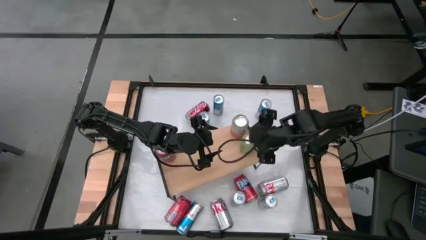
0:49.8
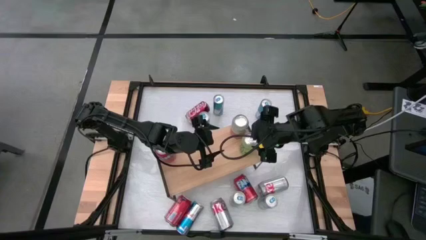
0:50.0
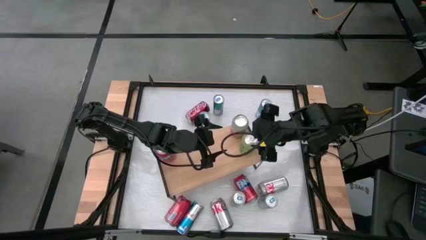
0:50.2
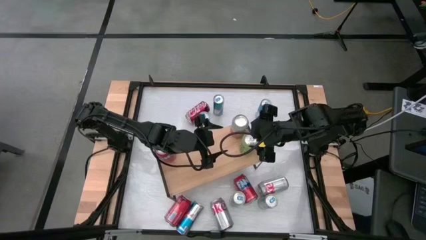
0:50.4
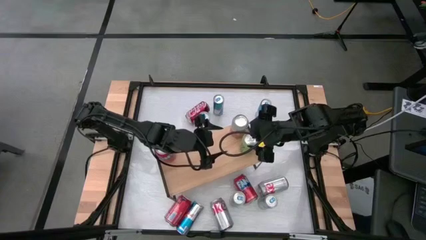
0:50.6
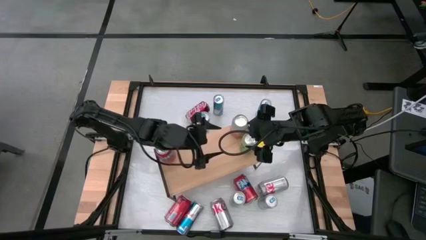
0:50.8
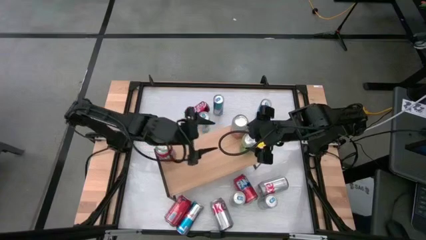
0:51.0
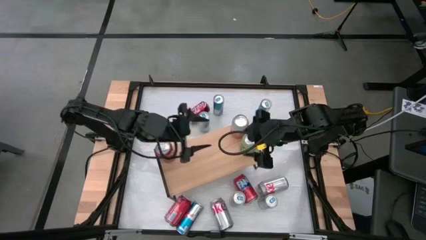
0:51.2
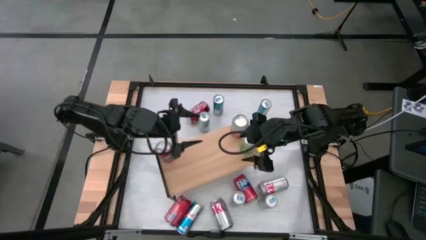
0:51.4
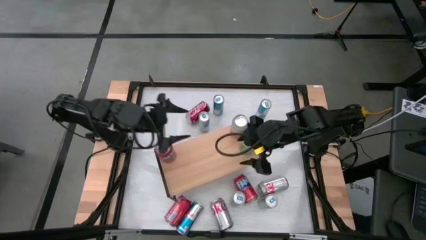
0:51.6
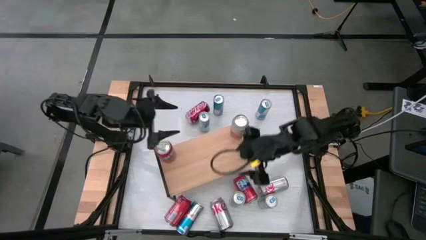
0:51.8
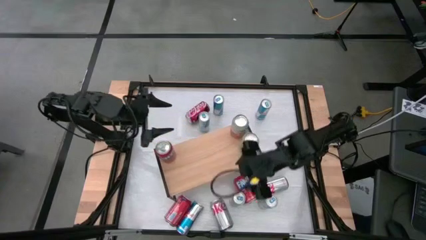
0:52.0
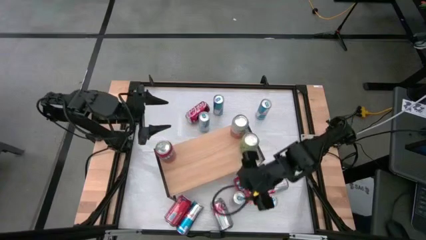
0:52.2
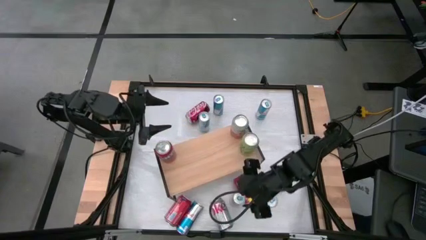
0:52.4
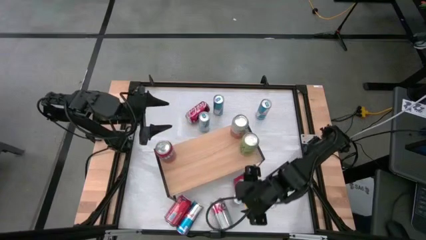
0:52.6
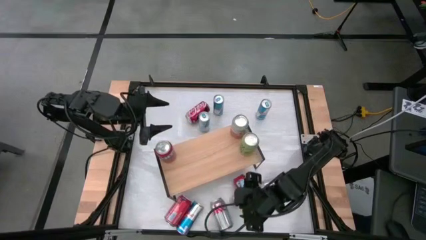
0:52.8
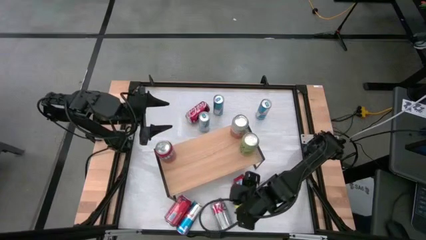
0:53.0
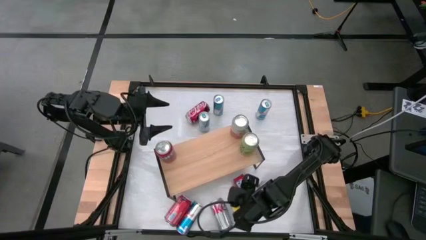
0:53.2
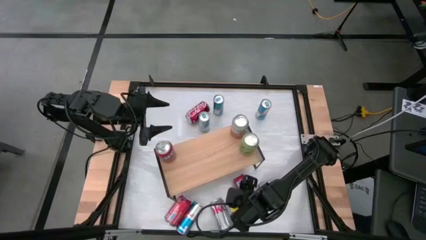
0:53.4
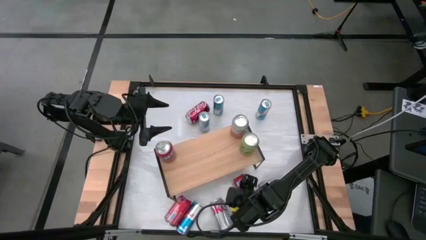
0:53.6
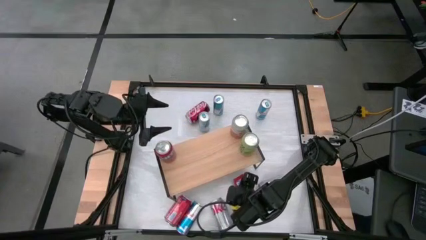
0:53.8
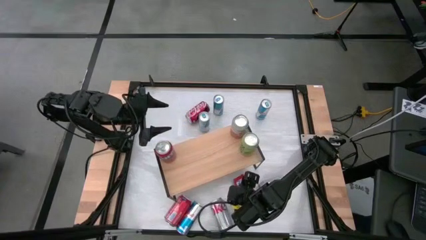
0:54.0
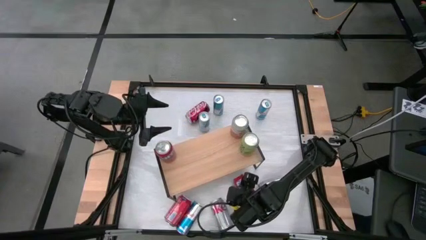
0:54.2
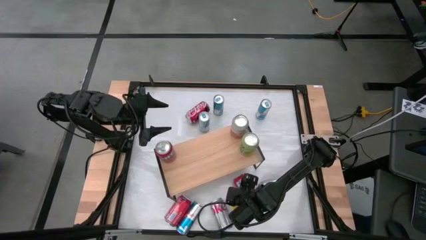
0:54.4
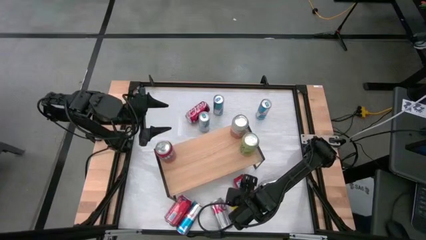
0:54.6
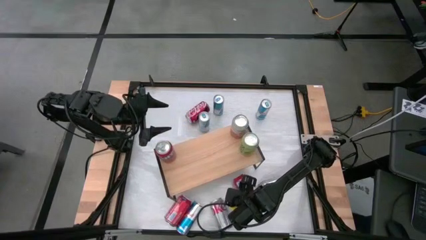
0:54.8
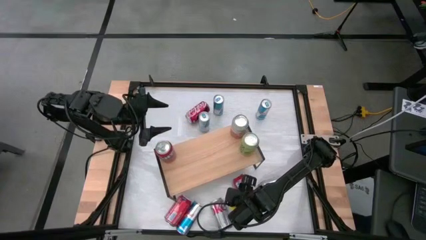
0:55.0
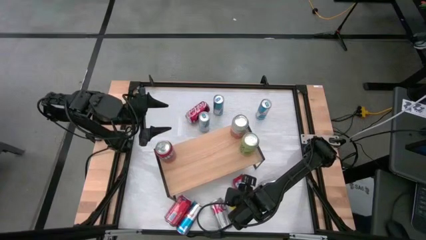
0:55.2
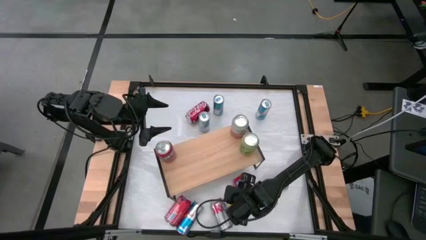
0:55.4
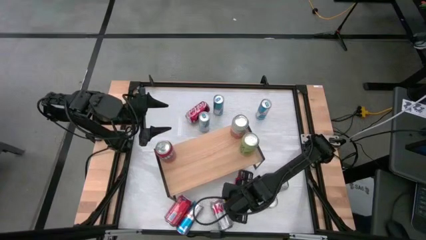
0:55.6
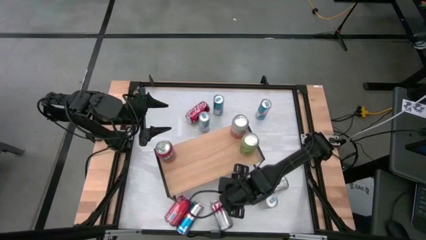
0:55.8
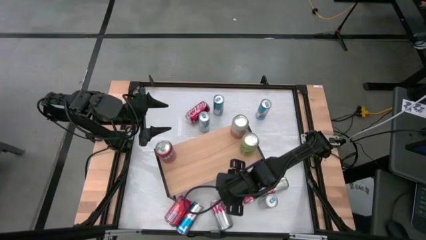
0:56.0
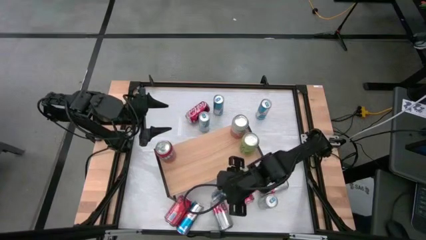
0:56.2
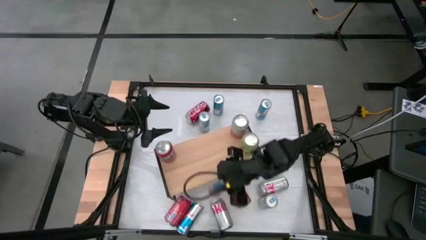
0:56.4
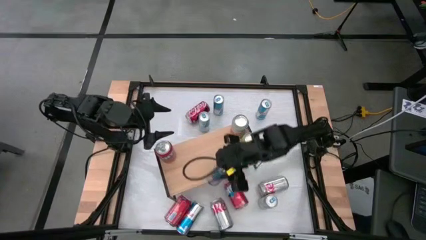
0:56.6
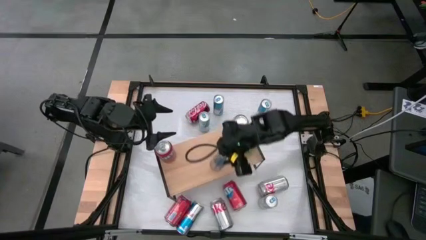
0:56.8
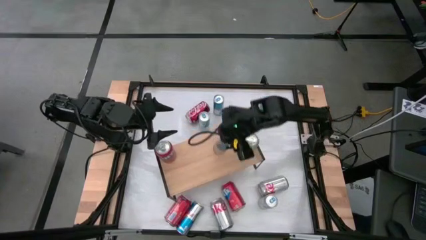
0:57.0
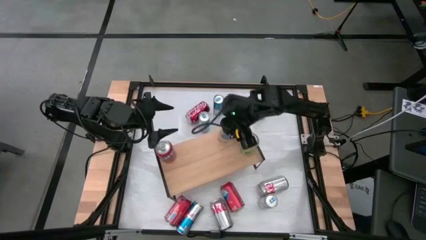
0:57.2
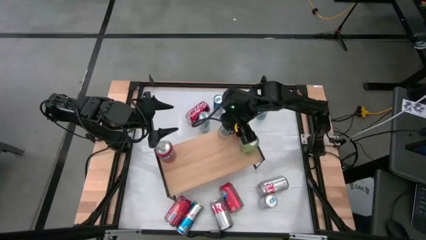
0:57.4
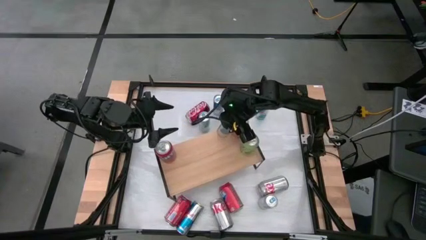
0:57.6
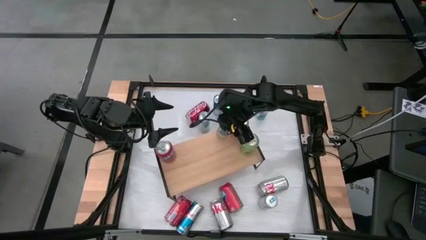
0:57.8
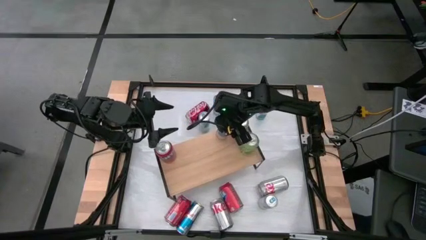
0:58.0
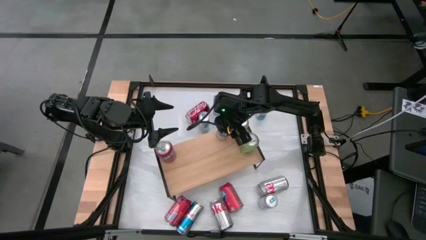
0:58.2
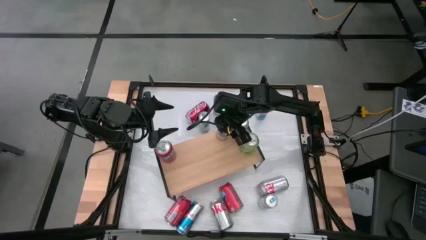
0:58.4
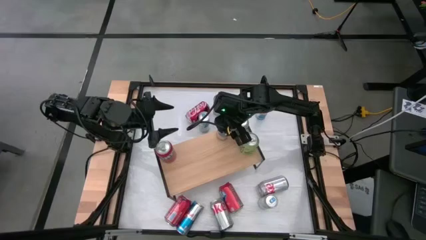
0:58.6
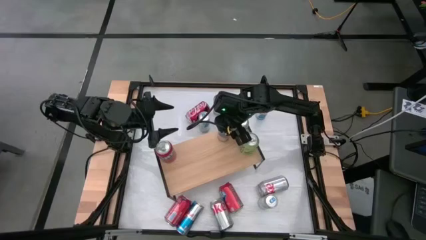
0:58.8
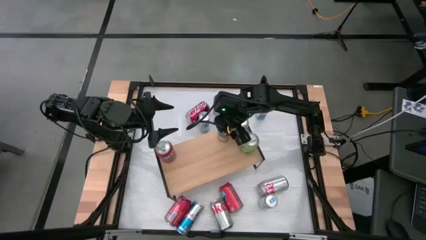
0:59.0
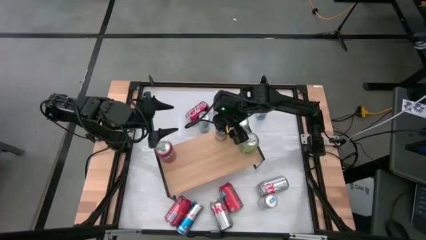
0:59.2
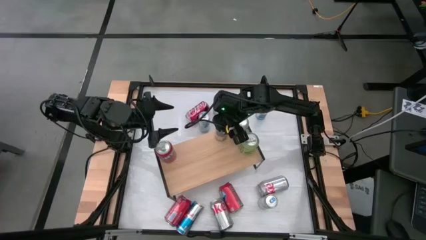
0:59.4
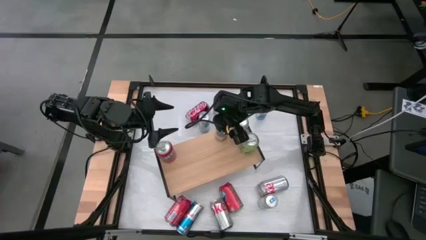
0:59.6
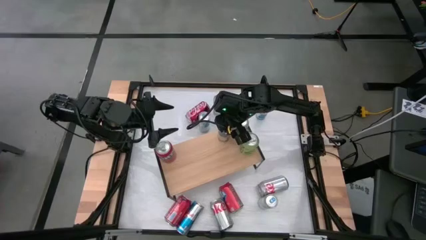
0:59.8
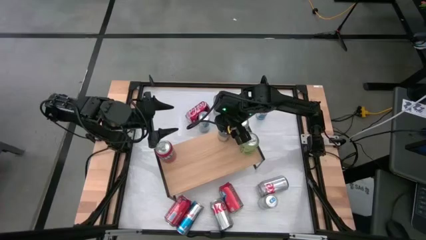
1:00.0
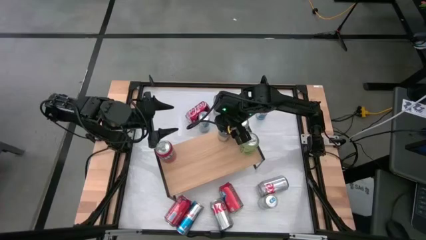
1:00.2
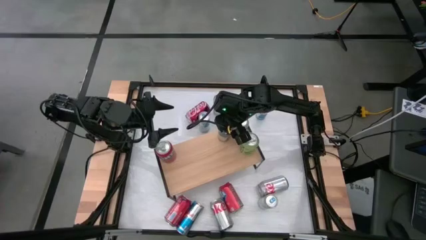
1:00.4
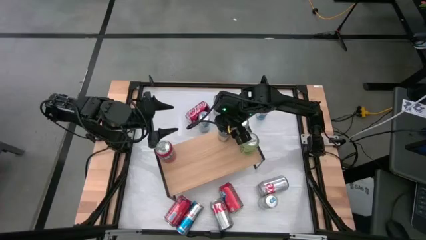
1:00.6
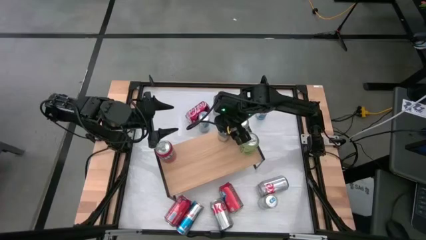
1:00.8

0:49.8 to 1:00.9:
Task: Place canned beverage on shelf
Put the blue soda can on the shelf

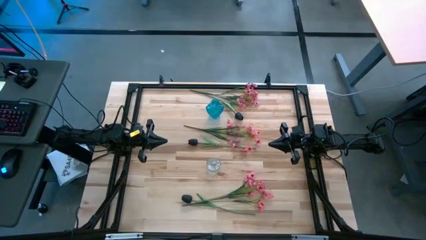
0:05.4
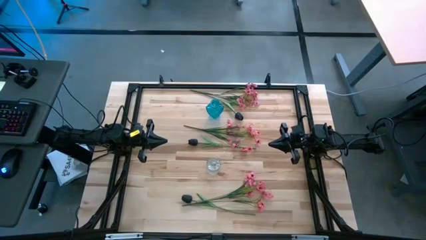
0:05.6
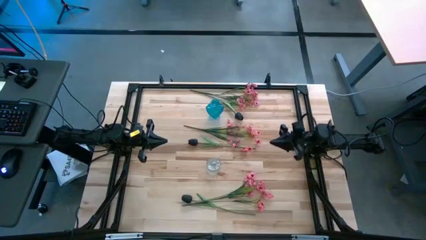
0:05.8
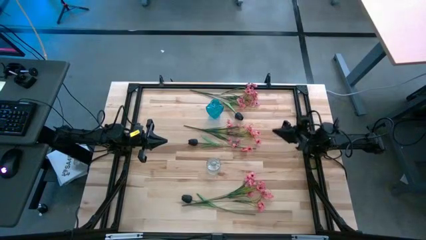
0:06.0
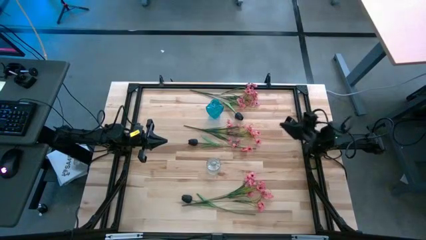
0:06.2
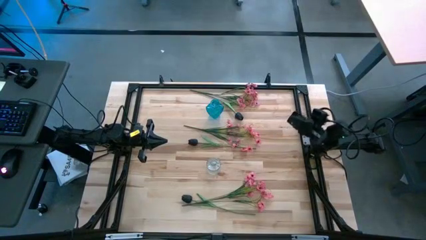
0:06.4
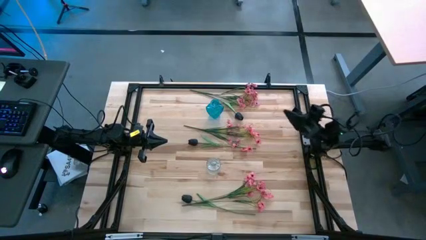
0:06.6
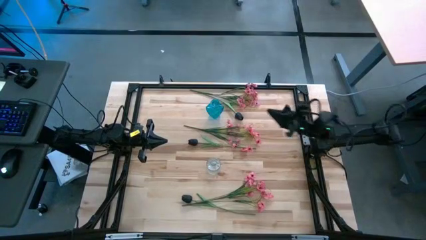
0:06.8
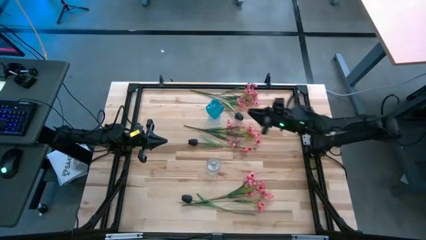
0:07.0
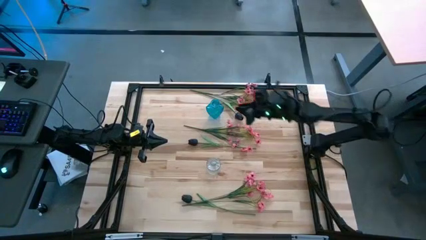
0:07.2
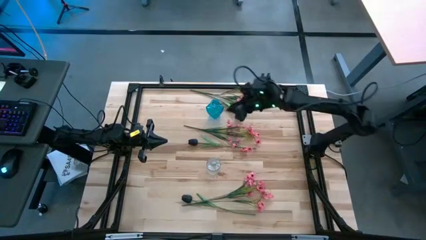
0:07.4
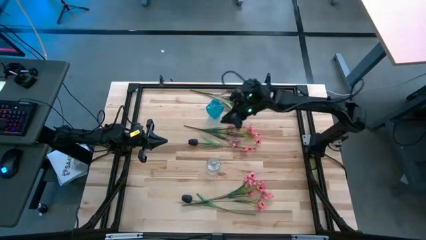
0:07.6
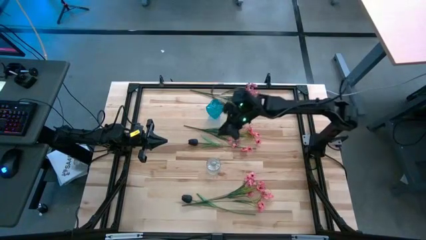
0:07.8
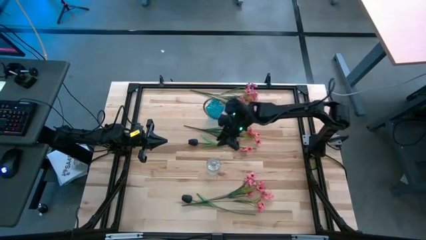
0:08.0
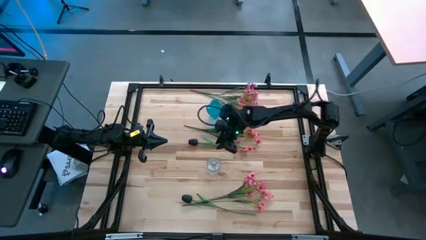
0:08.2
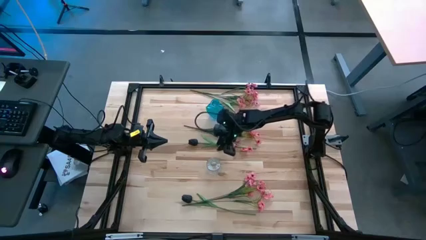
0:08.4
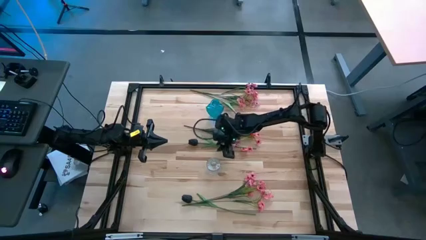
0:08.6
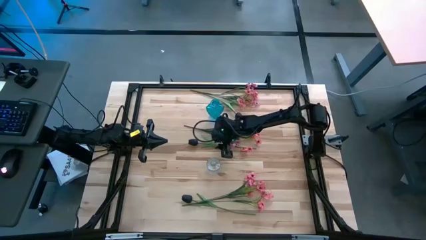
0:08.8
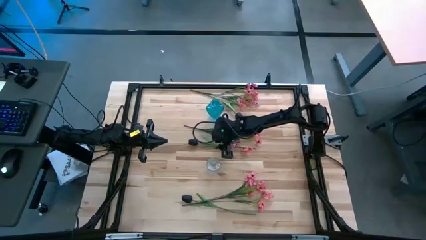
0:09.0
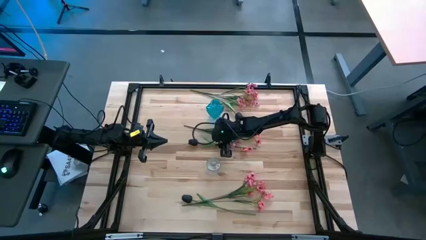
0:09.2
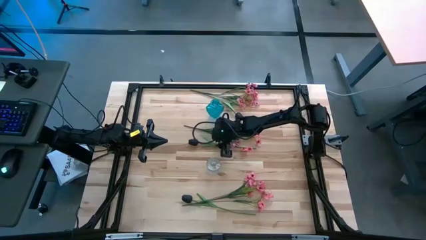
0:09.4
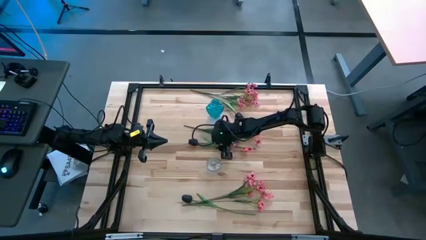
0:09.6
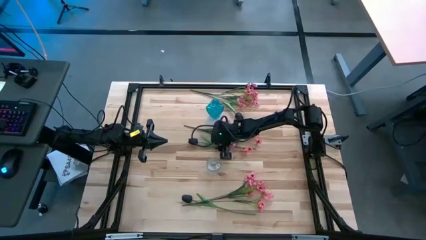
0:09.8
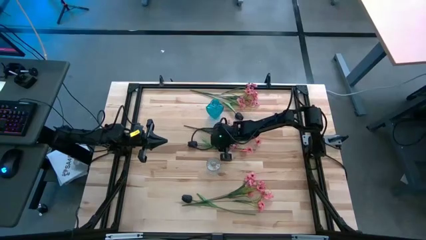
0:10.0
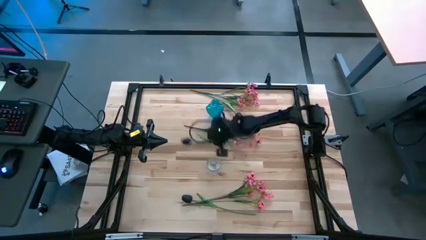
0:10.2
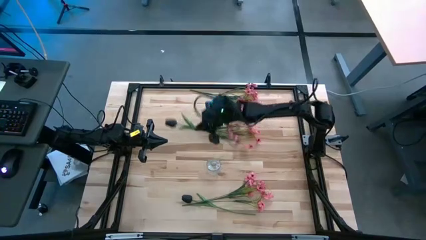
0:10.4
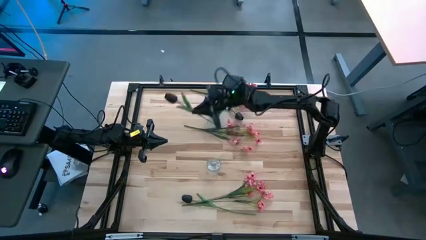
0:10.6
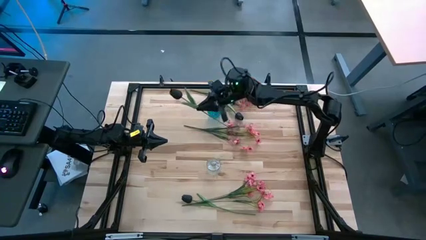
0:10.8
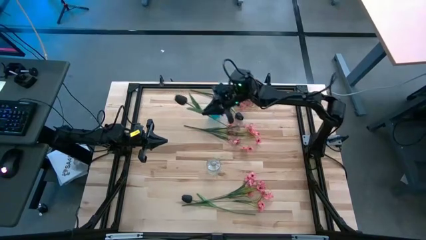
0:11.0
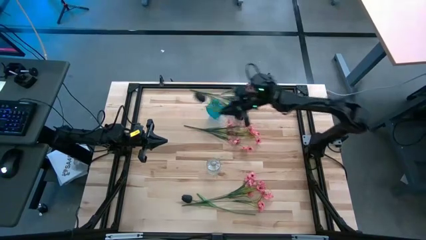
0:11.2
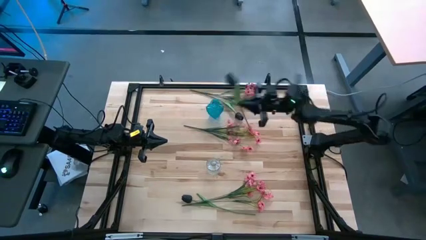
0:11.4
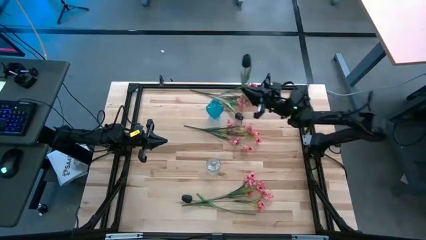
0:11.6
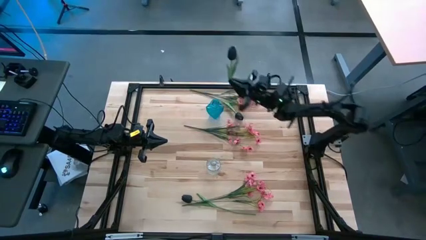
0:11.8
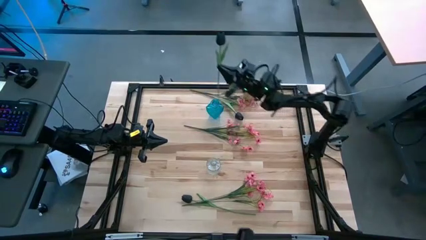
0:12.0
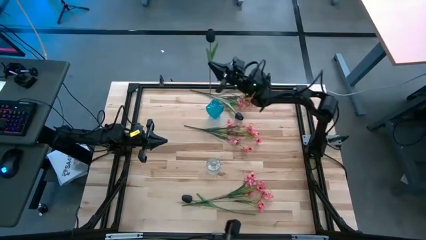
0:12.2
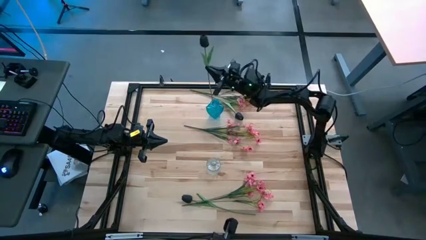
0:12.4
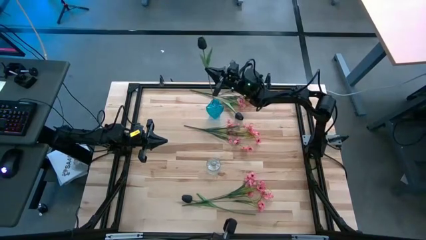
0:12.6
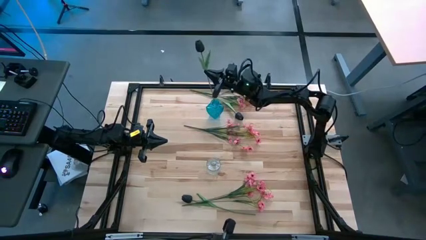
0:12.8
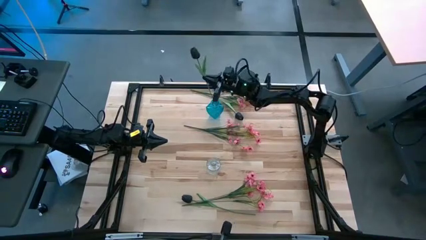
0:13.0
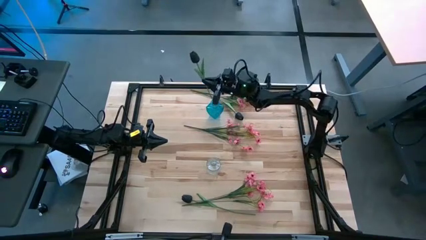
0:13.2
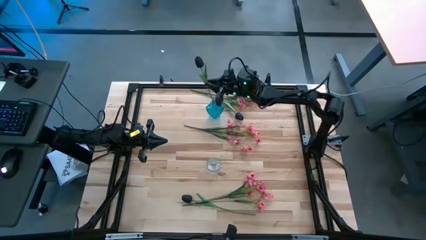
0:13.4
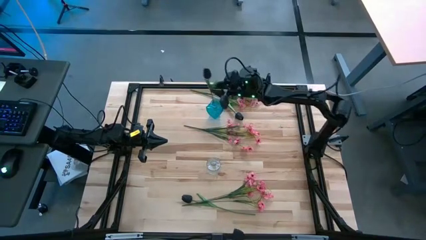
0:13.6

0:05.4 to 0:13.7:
Task: Sort flowers into vase by color
Put the middle black flower into the blue vase
